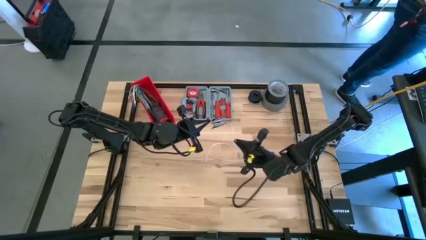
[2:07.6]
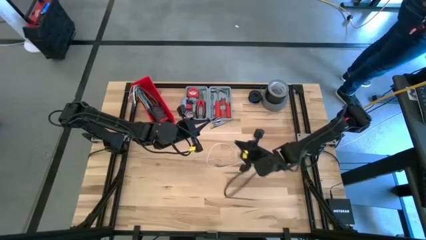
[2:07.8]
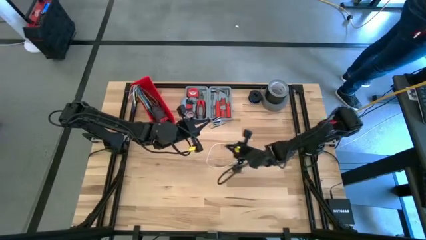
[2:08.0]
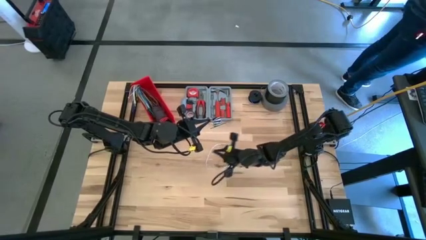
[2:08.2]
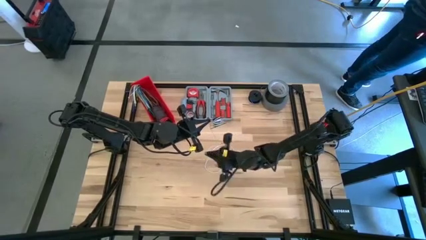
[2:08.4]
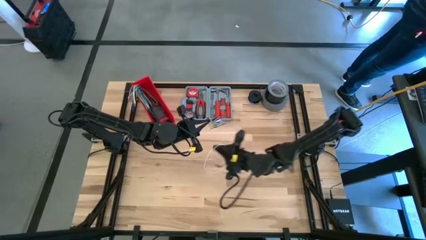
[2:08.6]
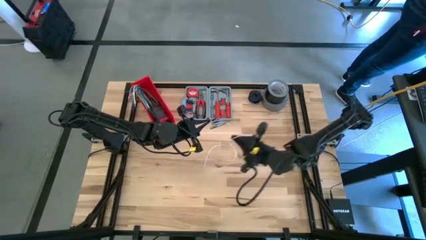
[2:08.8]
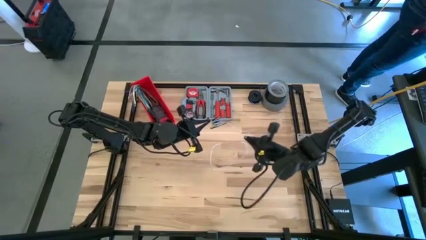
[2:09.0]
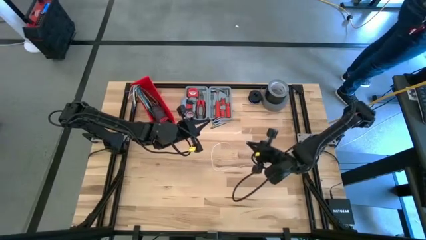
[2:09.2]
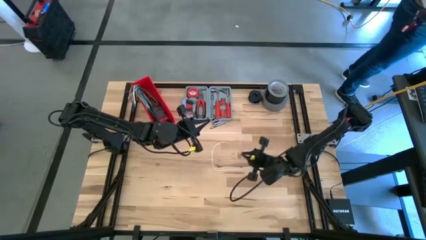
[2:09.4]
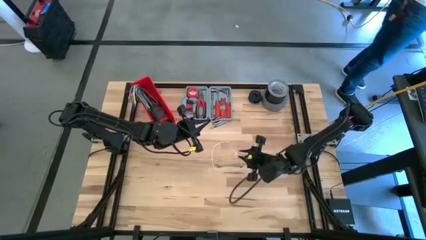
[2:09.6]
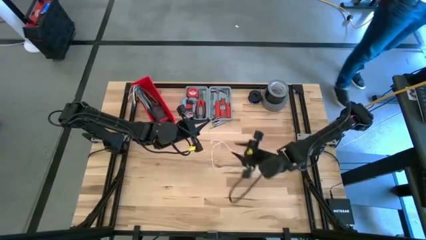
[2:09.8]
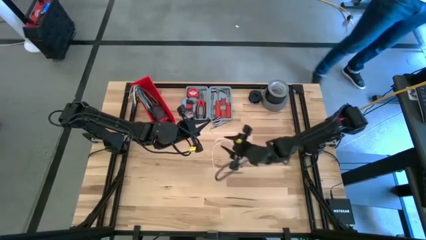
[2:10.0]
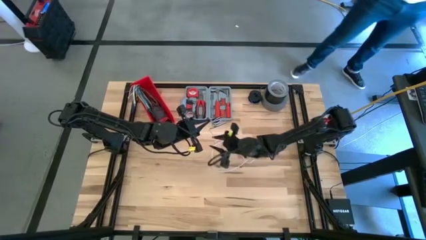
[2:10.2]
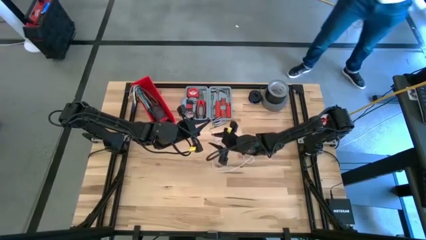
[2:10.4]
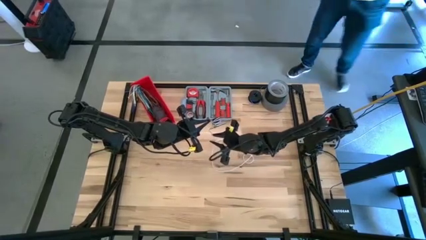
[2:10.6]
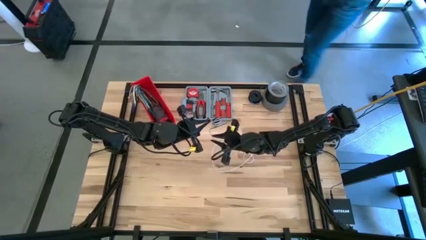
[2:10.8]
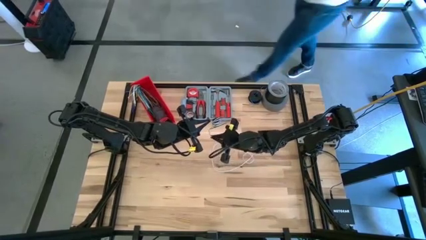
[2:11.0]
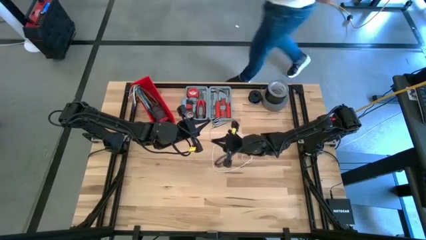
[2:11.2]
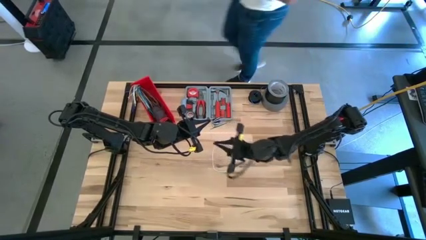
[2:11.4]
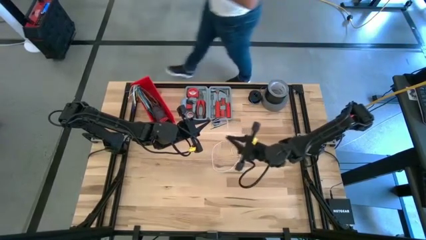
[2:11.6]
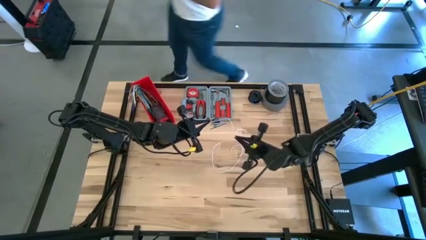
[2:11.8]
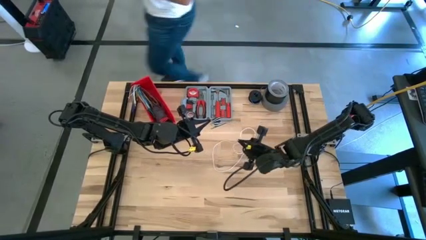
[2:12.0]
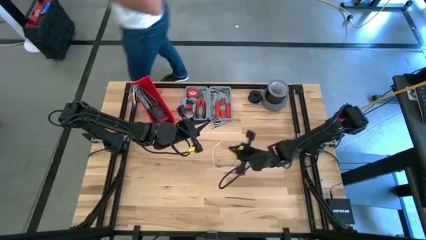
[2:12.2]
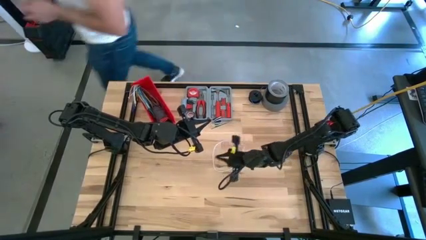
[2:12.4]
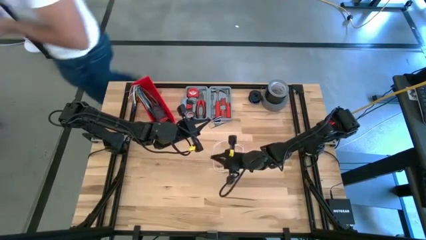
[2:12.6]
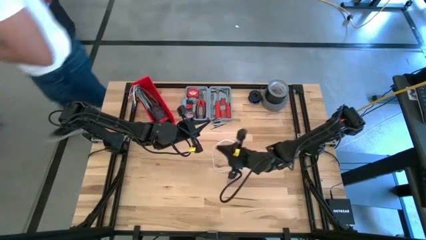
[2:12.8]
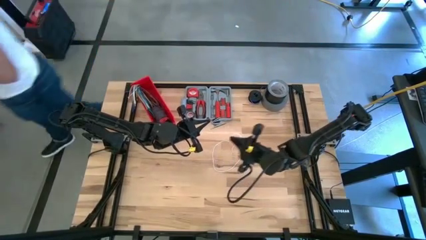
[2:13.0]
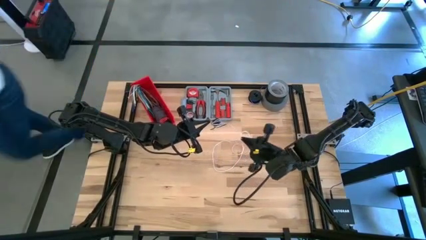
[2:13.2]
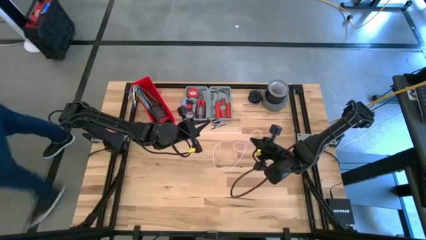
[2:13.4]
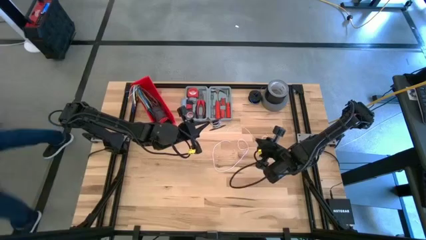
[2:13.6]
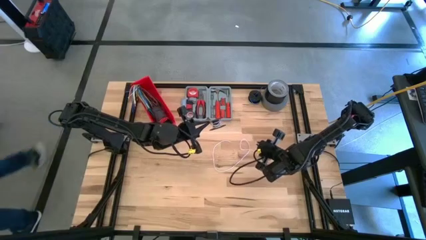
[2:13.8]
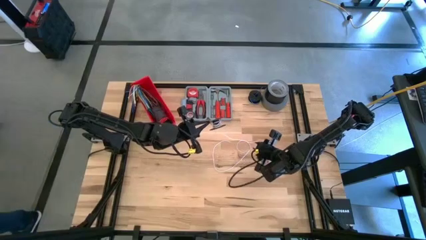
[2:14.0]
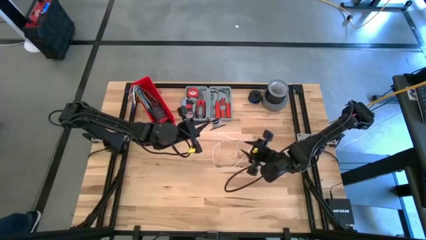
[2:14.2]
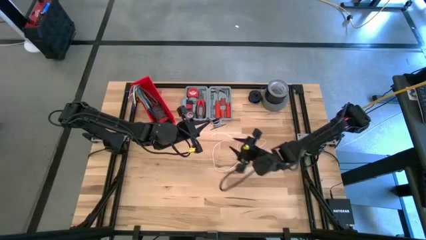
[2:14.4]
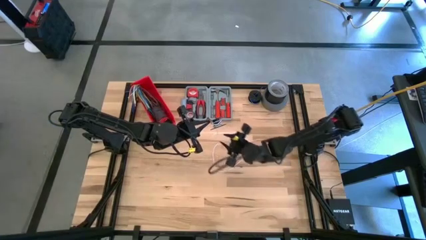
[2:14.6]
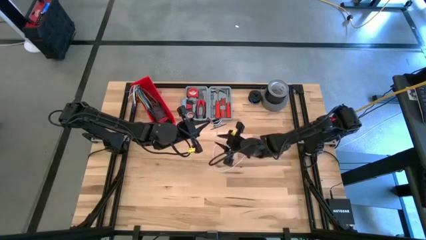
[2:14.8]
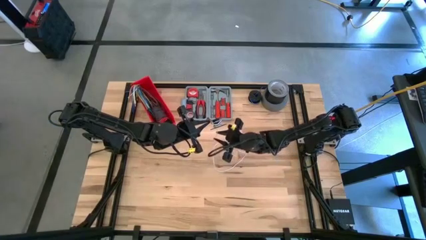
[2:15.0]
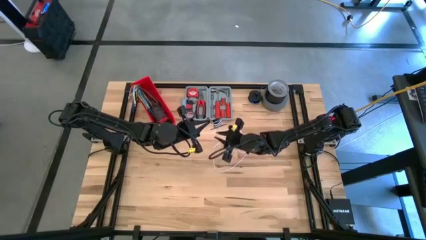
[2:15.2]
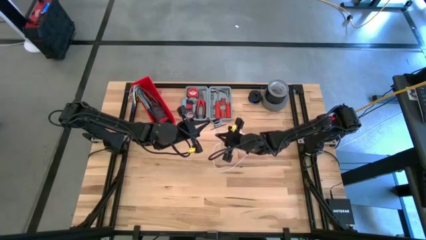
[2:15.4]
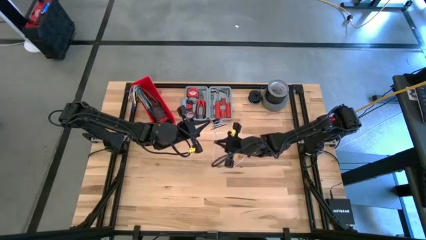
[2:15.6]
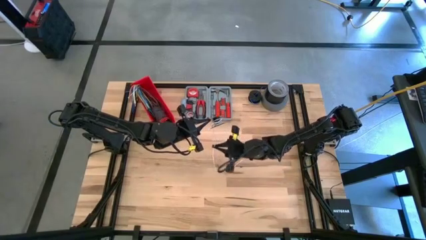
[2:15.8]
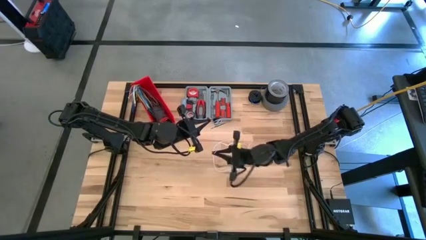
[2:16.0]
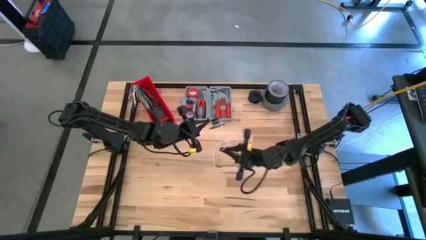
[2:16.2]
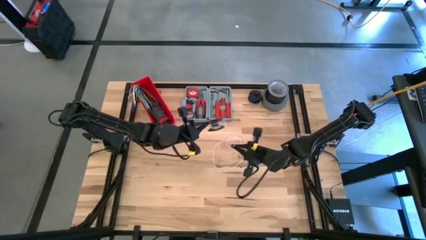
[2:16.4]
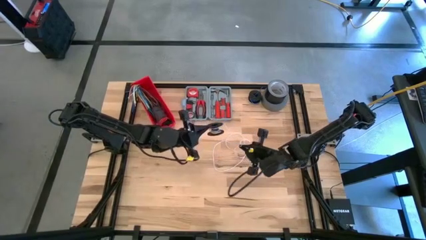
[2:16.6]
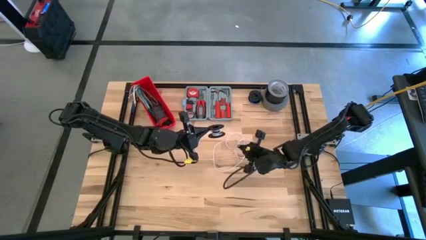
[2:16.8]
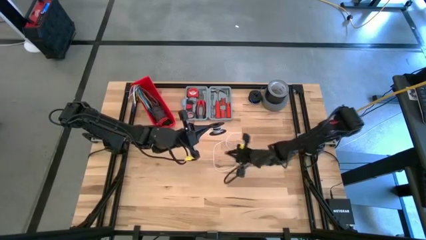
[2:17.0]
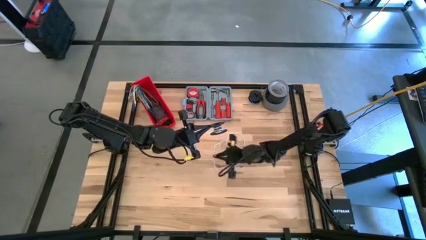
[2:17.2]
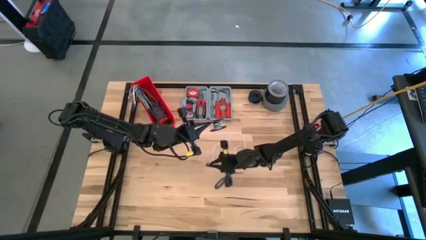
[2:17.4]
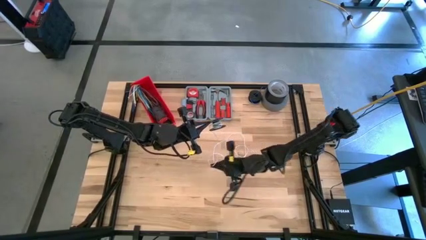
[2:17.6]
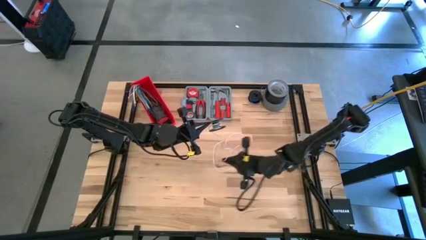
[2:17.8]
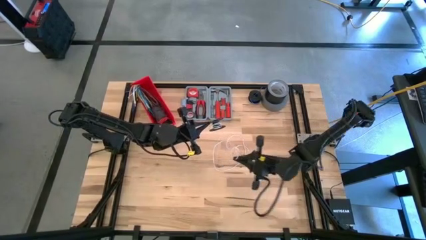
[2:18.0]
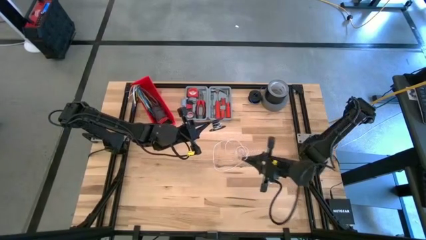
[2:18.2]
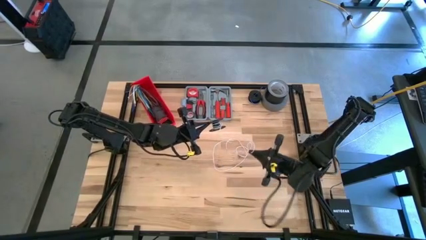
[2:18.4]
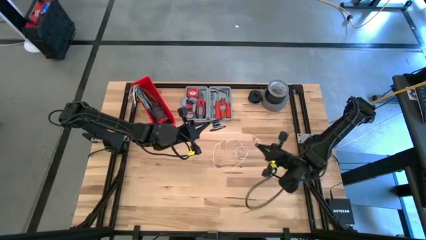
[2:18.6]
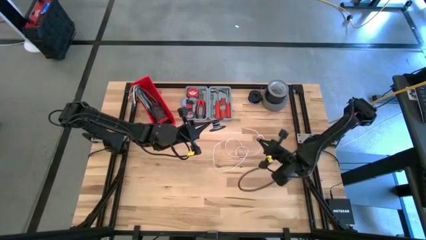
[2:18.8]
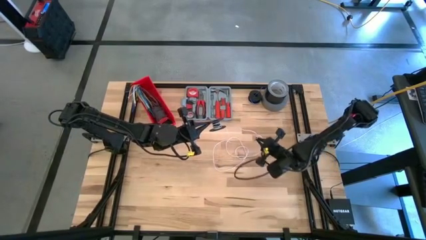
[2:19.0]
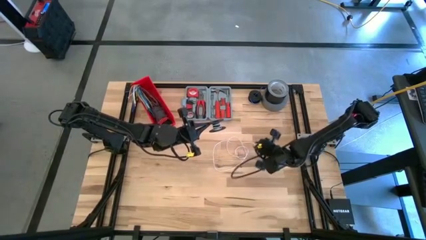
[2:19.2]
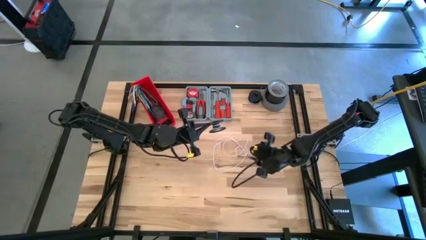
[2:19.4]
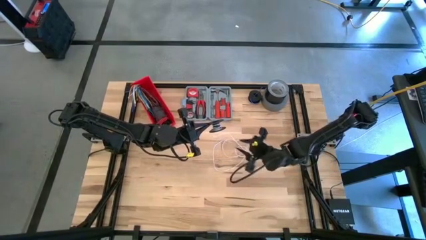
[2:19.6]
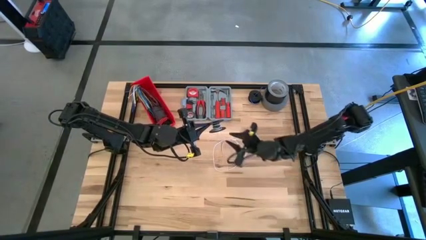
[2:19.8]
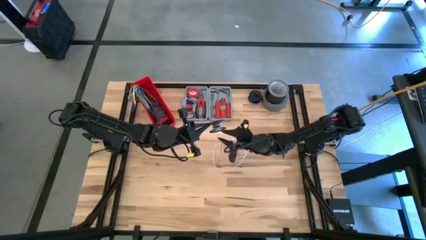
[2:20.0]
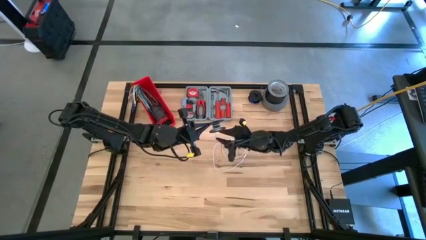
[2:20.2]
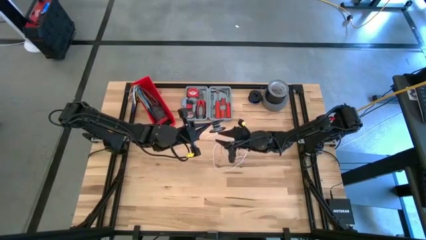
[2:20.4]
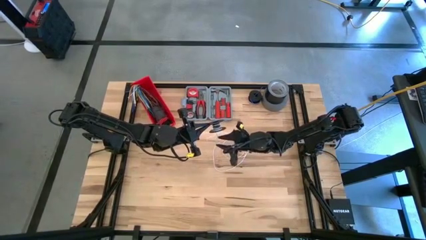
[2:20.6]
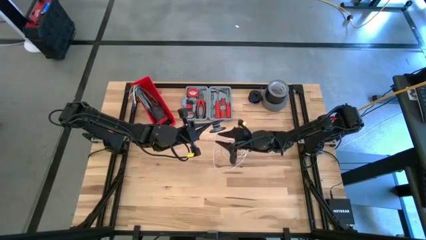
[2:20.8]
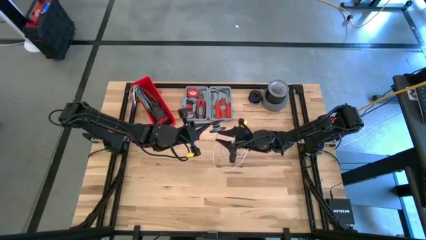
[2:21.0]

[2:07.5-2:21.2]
Task: Coil cords
Uncoil the white wire from the spool
